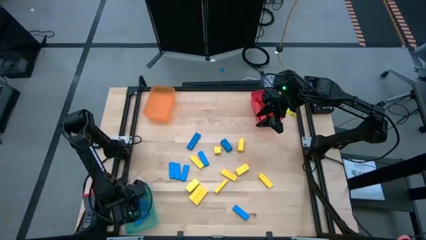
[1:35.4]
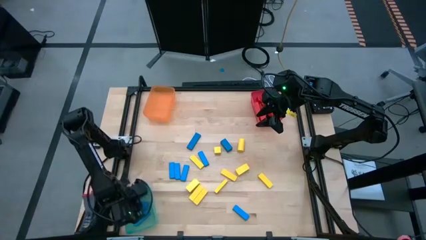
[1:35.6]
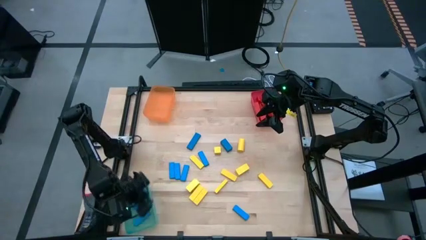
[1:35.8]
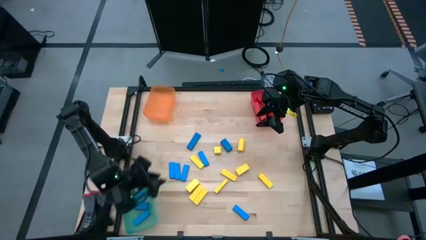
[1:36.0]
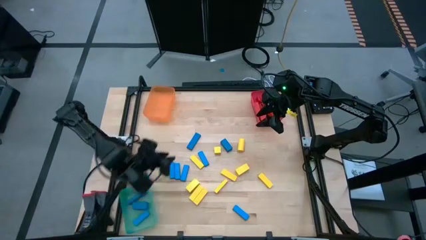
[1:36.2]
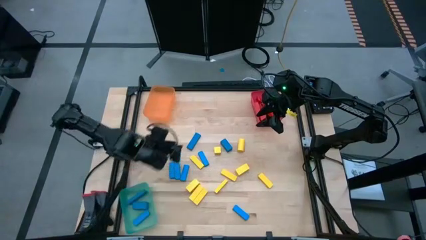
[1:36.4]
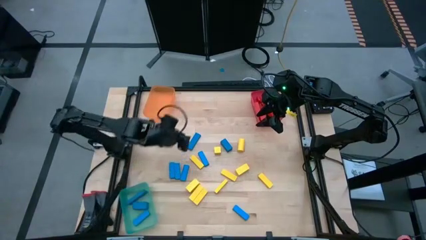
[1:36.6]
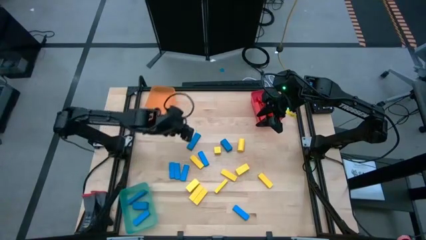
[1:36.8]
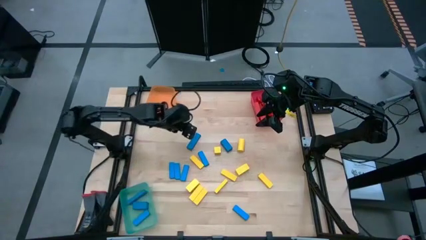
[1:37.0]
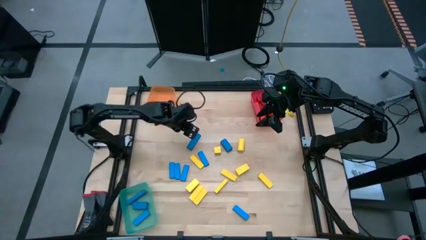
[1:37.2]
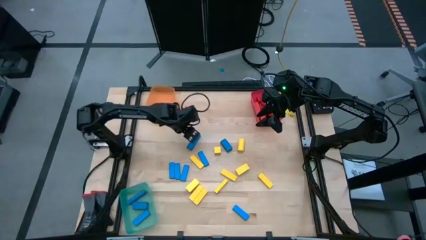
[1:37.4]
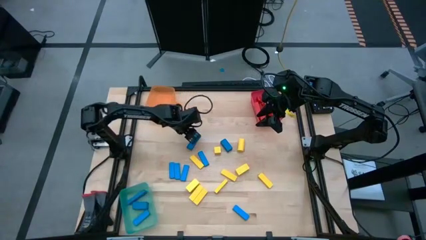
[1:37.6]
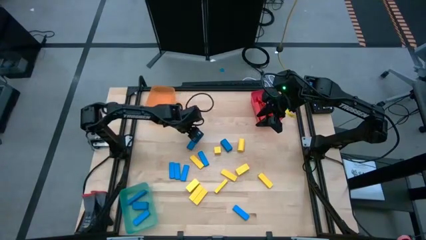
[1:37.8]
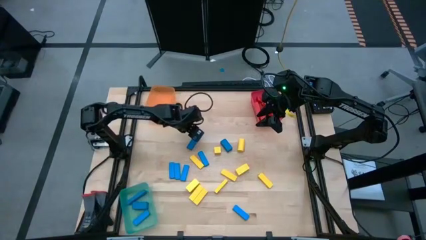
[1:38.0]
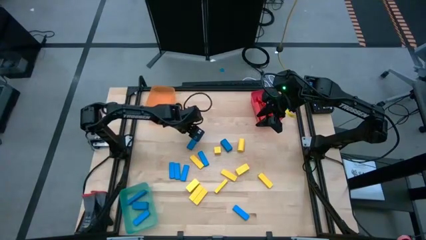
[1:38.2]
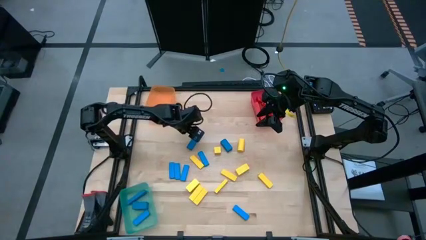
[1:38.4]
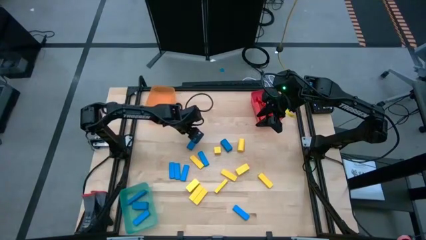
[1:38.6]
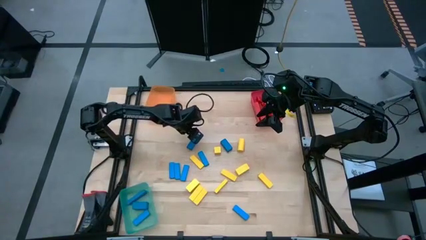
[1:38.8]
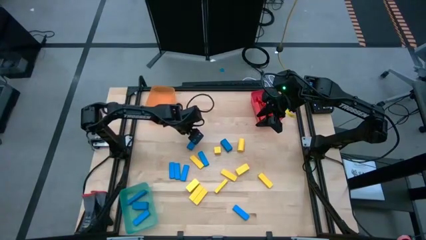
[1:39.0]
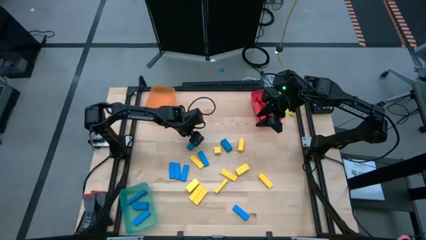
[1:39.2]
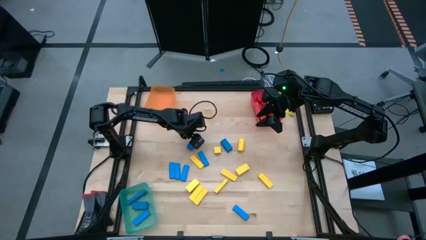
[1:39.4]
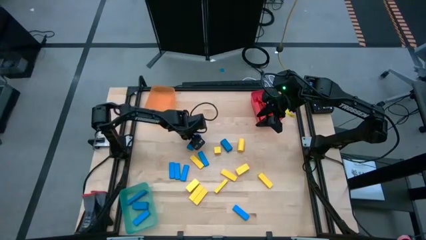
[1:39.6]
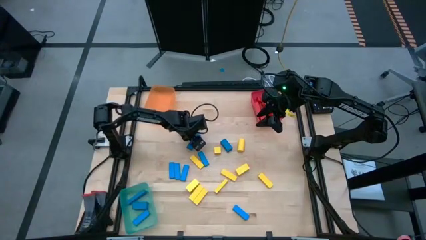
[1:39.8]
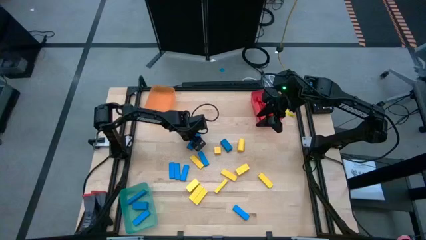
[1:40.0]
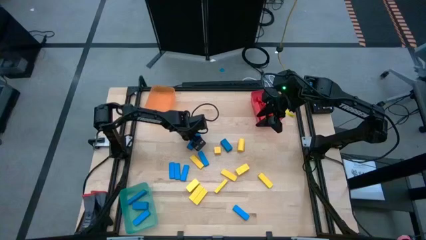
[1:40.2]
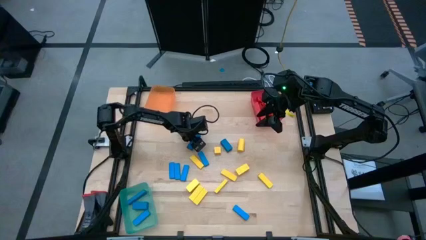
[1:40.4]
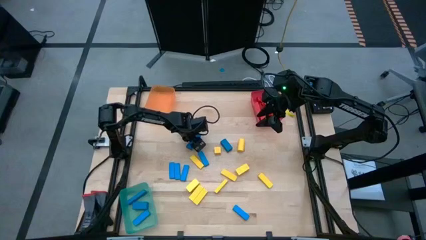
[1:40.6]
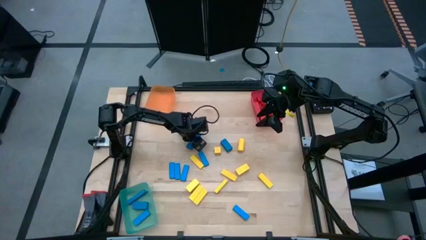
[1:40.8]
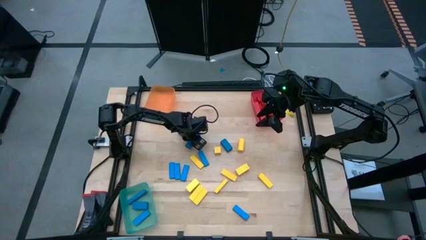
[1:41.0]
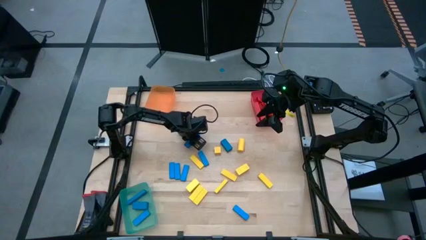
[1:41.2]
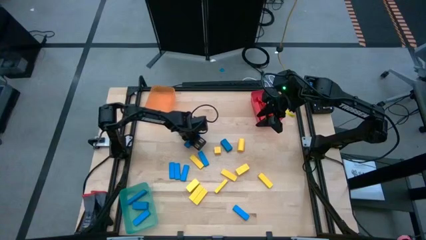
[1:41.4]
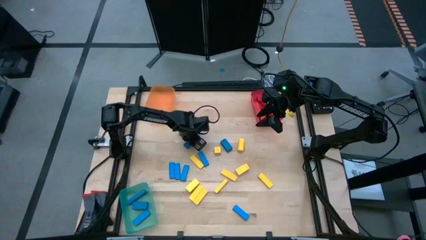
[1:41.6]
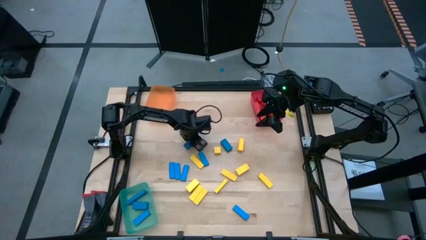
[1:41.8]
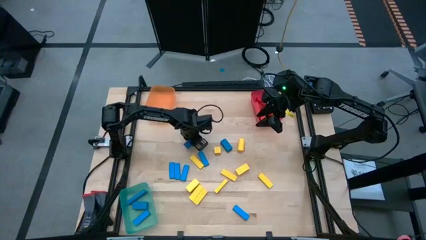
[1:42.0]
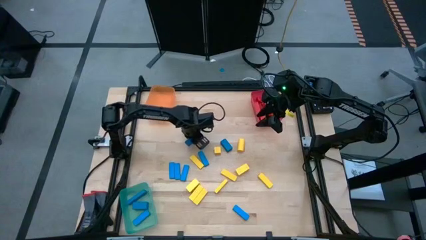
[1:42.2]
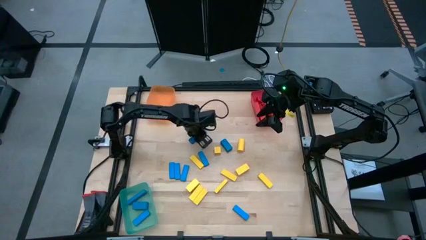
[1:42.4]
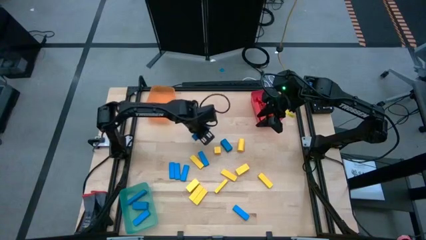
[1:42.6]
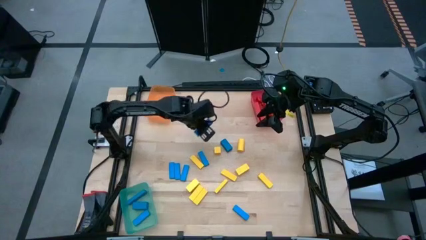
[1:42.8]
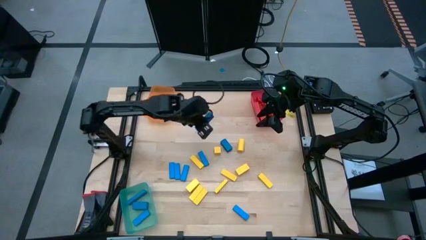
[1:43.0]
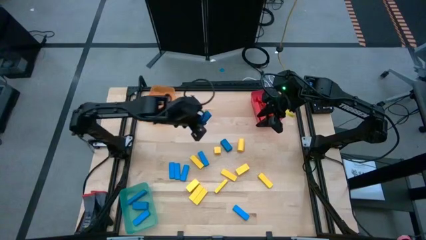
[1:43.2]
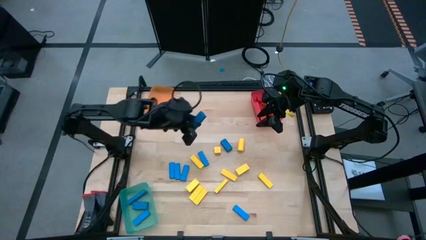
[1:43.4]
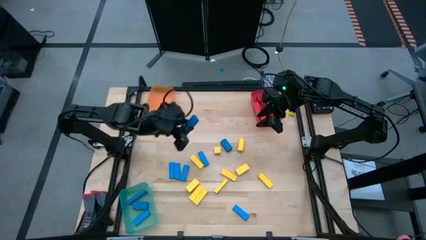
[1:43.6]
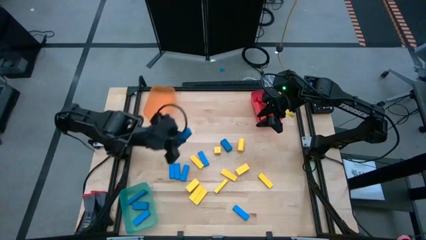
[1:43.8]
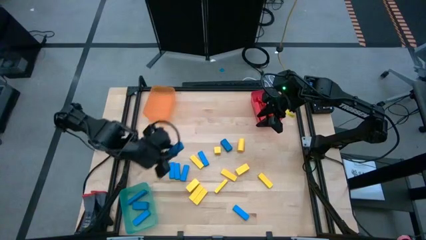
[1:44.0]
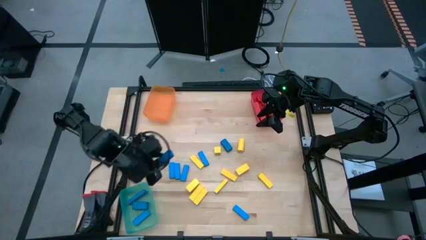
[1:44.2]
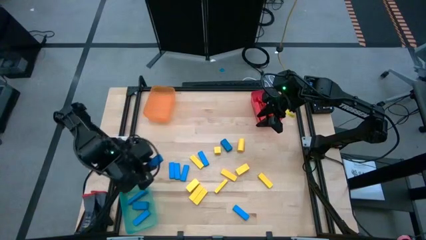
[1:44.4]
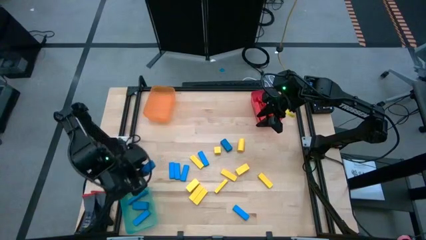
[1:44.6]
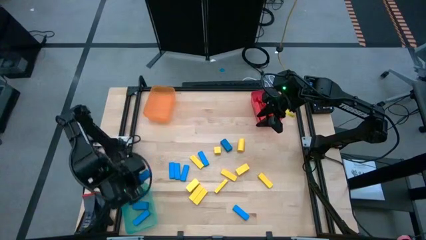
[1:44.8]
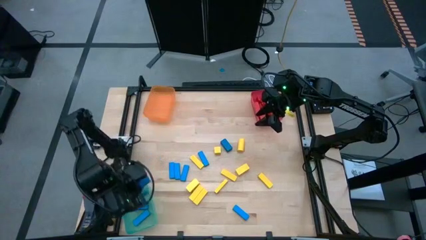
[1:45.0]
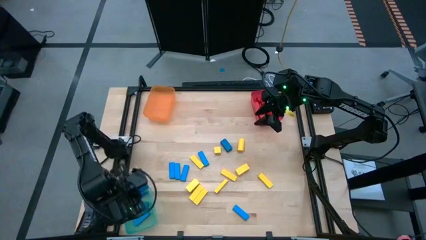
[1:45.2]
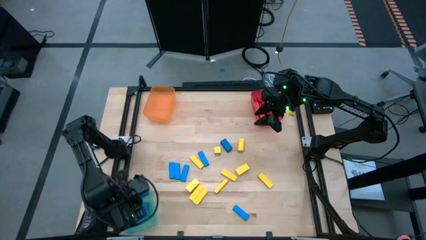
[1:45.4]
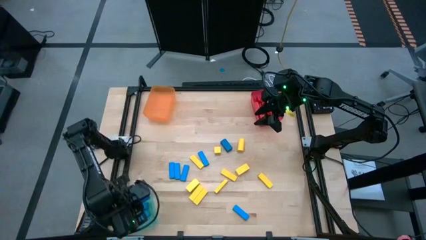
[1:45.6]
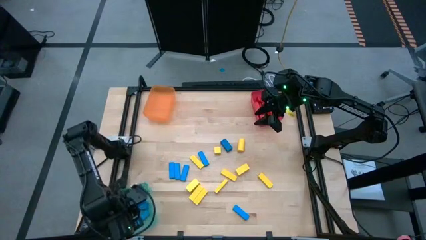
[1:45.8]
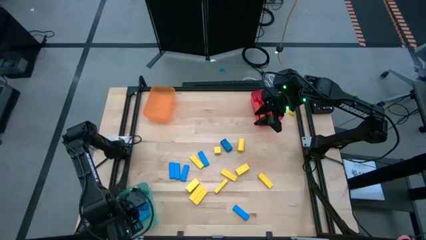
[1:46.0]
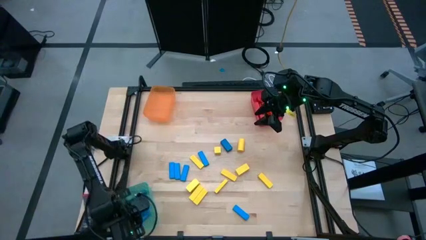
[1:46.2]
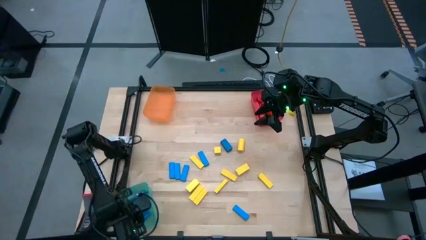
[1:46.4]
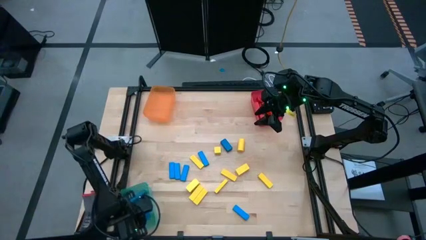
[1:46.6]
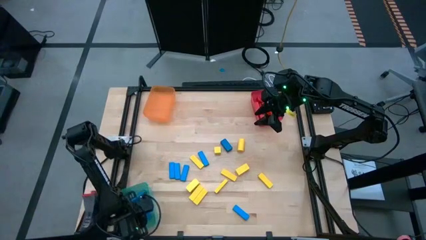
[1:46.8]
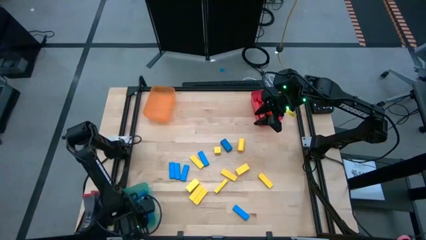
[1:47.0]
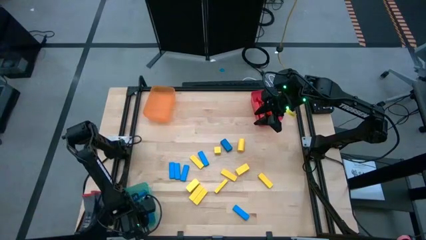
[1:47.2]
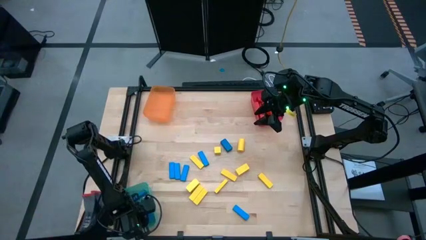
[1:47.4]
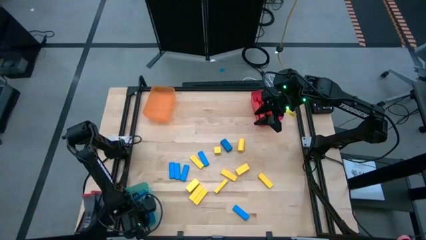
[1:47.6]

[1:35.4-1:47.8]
Task: Sort blocks
Put the blue block into the green transparent bin
